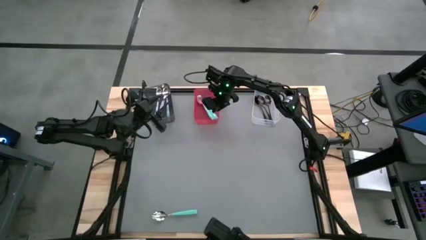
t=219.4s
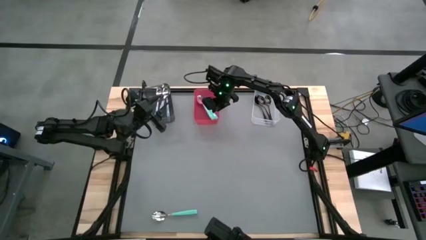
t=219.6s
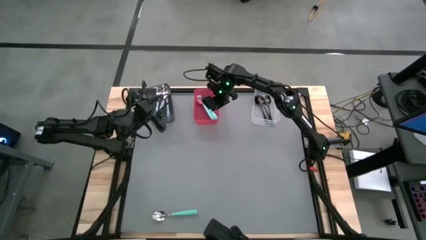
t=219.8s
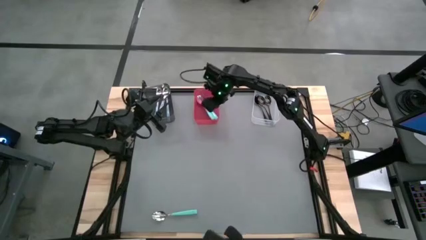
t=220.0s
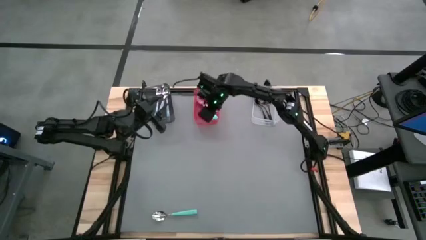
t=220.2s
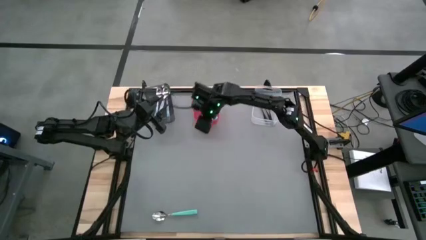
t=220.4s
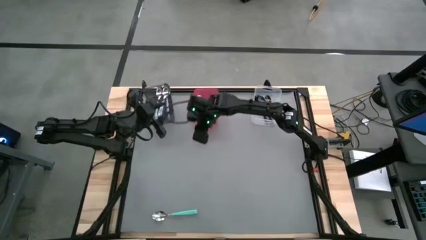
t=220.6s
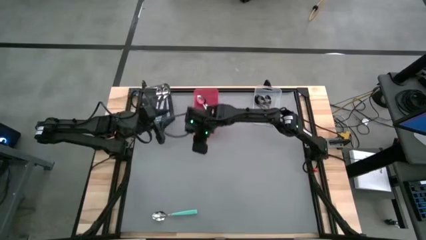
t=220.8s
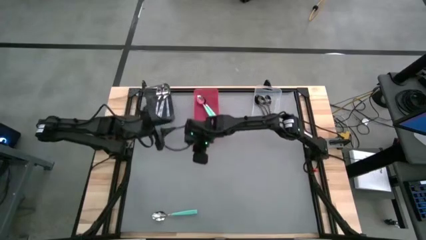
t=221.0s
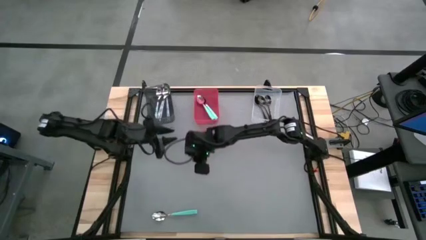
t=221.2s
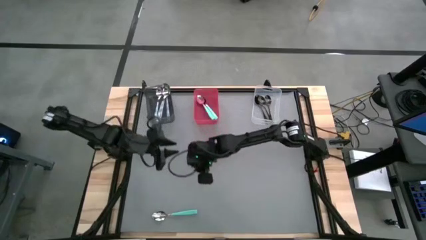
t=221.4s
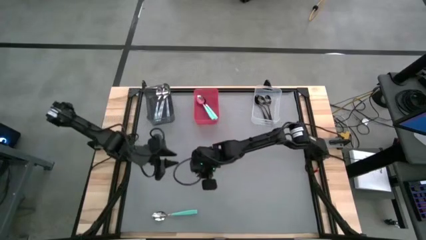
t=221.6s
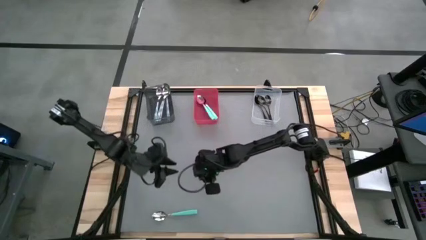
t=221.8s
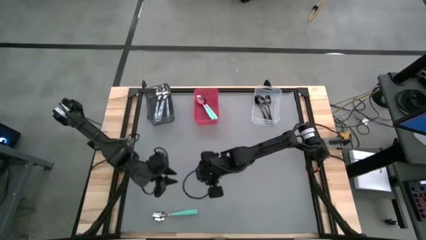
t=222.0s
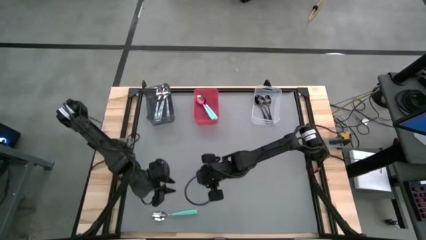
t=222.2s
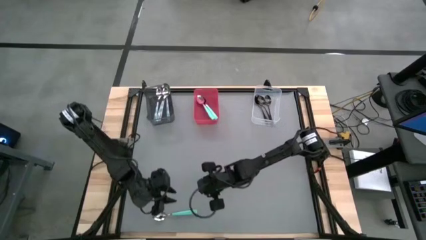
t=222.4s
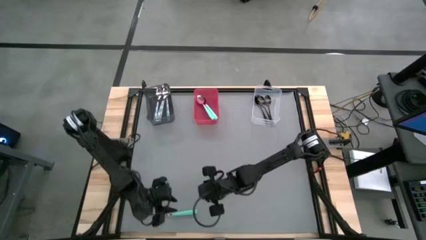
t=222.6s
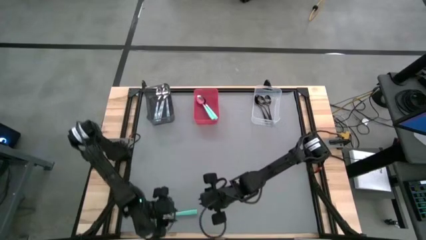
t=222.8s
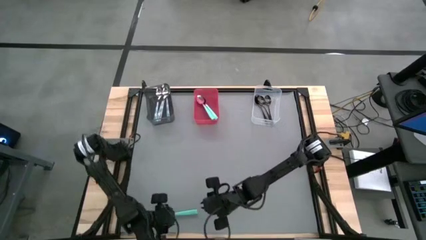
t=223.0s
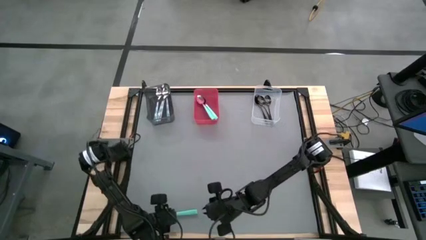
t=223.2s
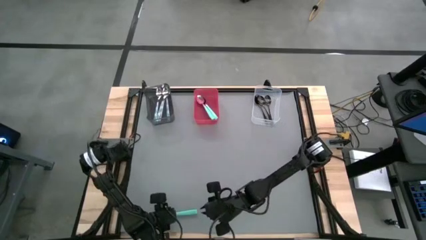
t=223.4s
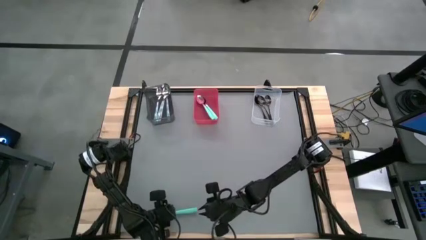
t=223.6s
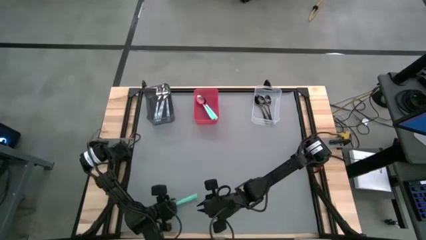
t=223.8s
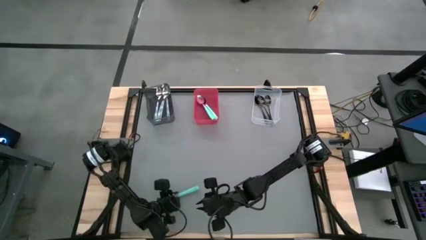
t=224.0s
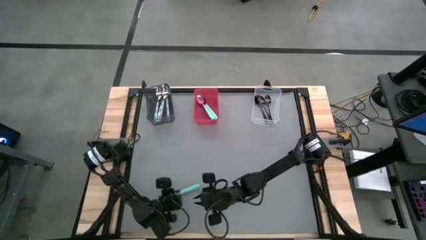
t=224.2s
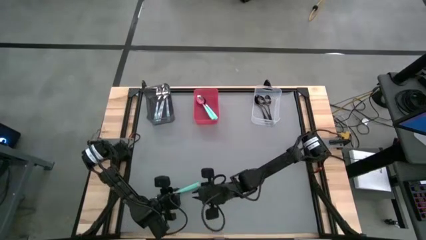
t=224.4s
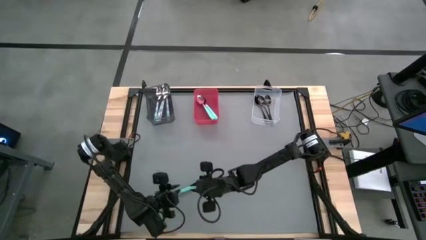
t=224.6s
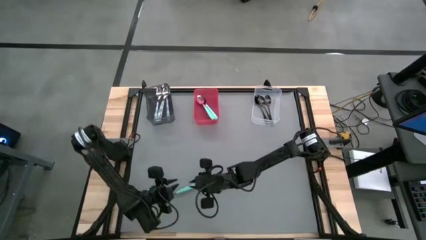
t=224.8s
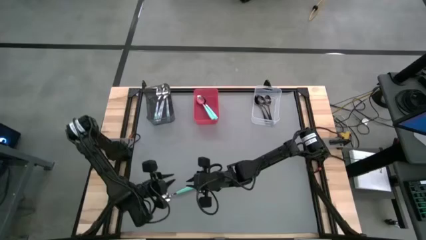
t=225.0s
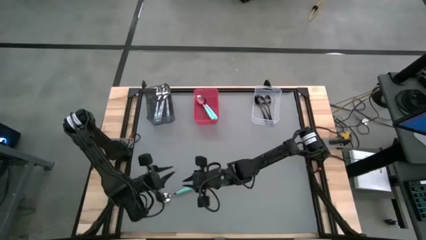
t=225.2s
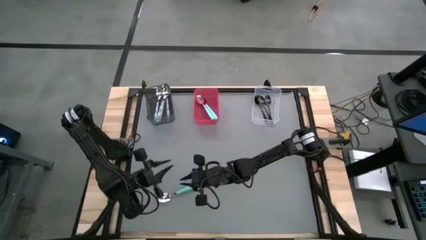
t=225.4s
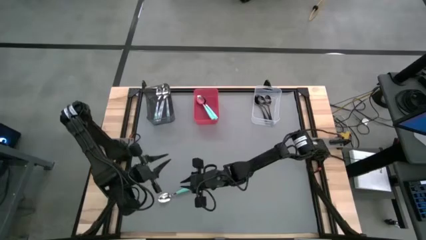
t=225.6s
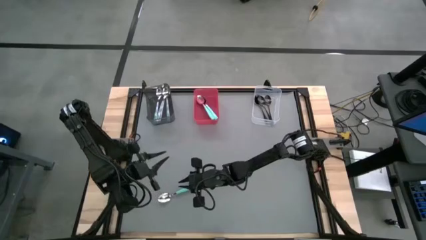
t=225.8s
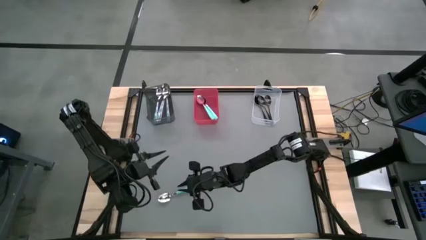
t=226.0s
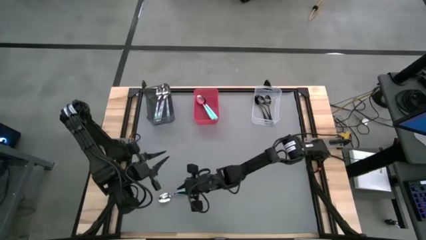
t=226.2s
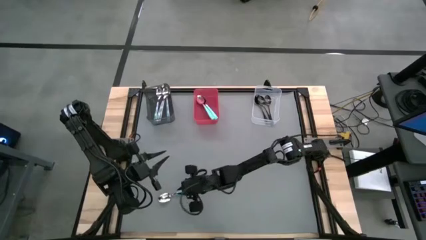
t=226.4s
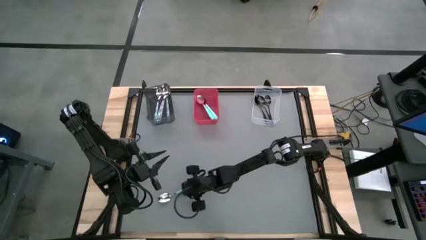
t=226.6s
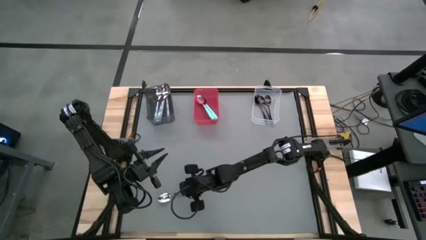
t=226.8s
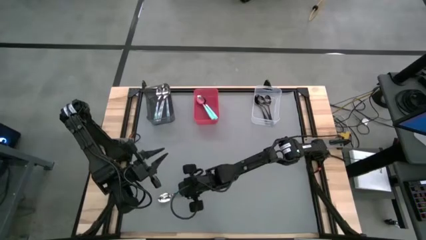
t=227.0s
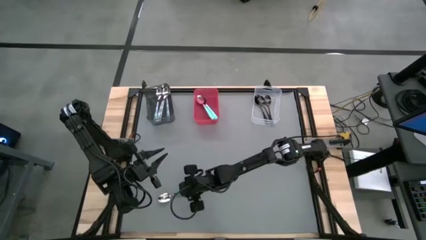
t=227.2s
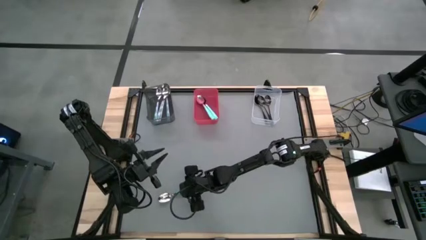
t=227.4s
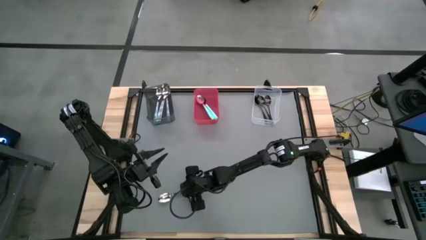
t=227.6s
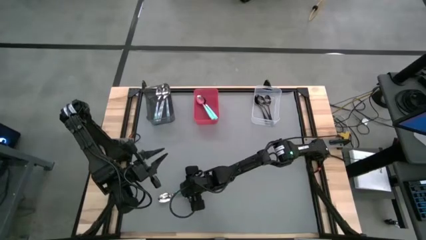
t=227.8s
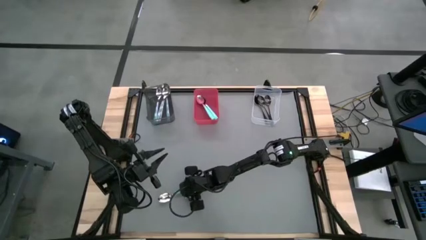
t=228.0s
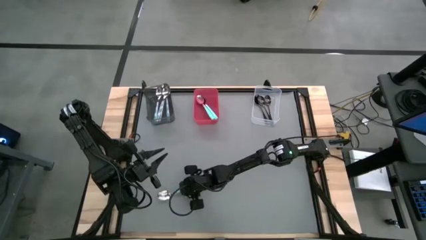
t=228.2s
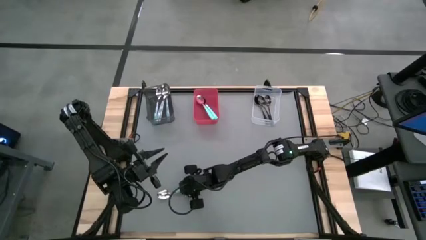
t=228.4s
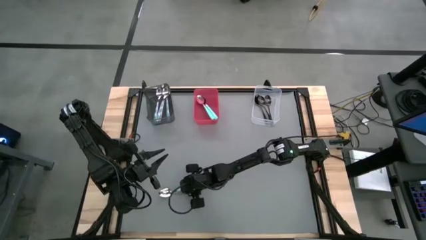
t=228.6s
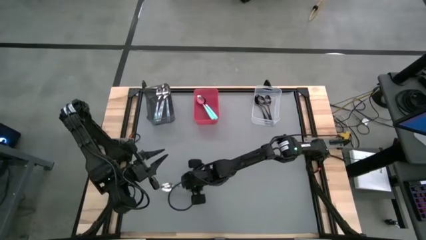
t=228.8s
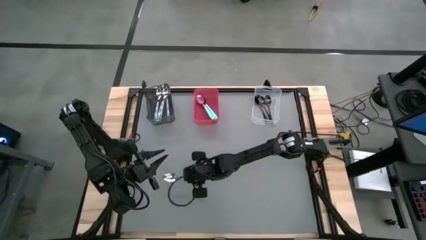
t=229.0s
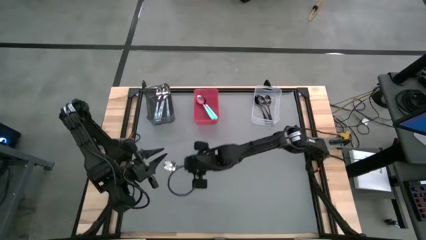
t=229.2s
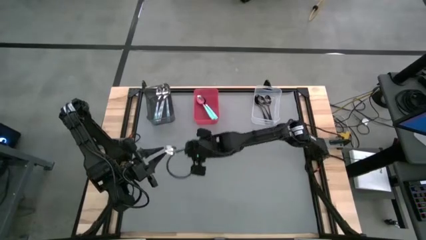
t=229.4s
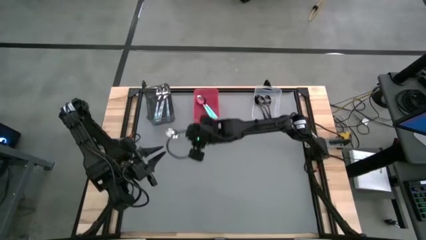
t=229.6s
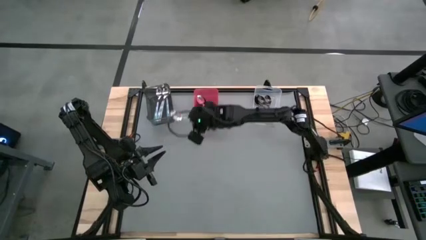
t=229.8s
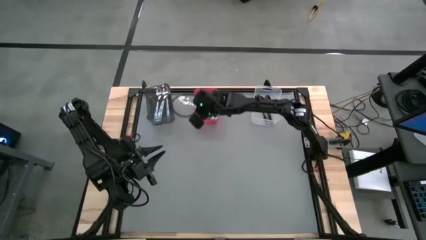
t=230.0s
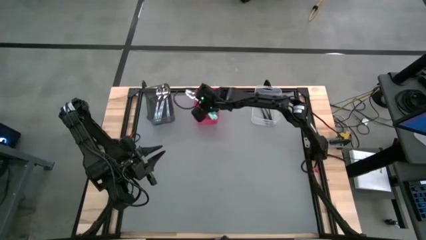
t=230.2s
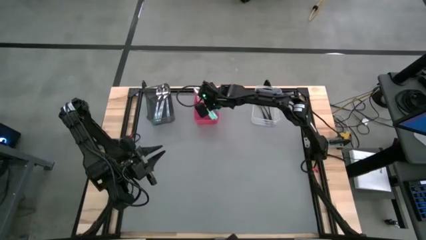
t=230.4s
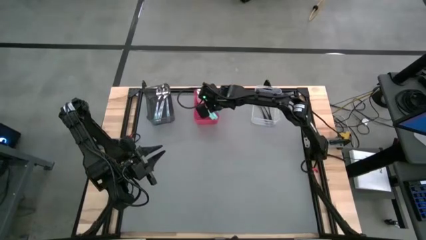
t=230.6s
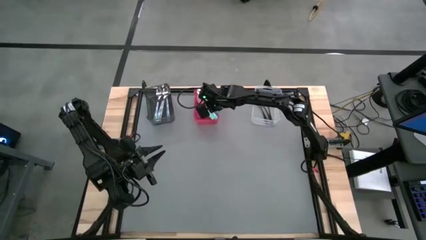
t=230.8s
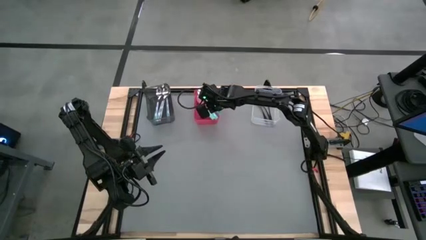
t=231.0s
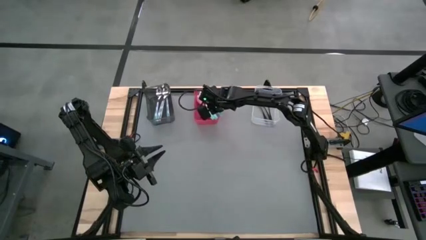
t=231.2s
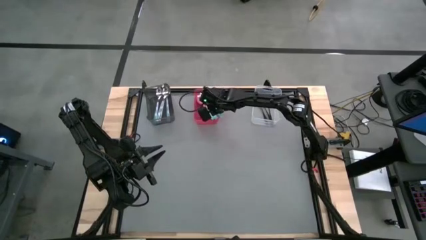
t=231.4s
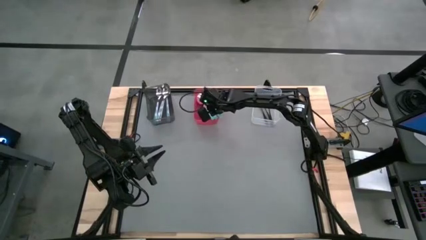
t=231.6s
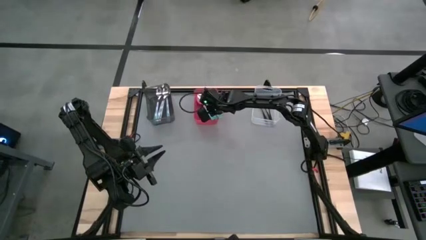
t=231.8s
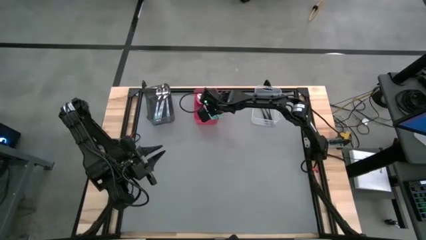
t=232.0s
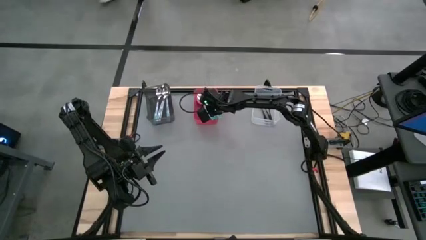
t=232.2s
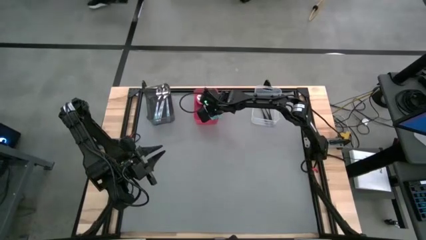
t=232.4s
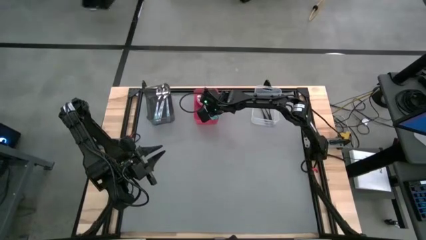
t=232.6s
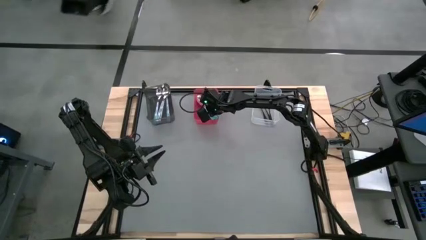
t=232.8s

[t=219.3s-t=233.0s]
Task: Sort silverware by color (type)
Put the blue spoon into the red bin

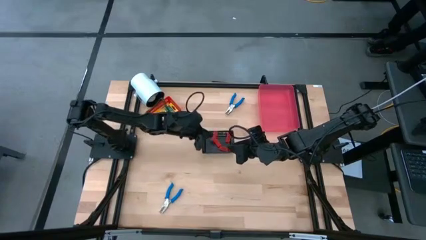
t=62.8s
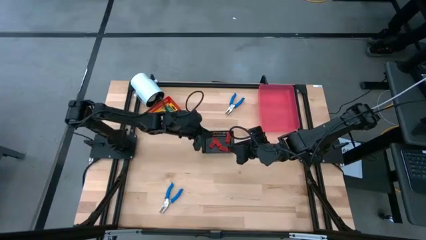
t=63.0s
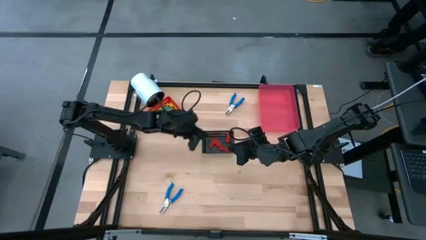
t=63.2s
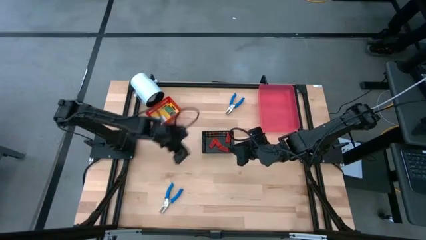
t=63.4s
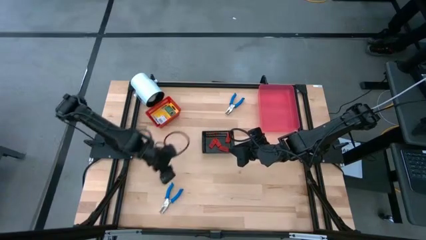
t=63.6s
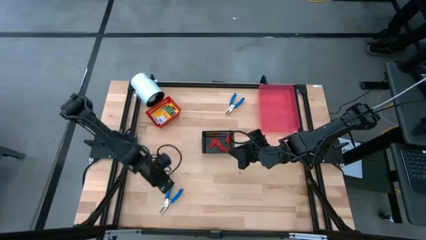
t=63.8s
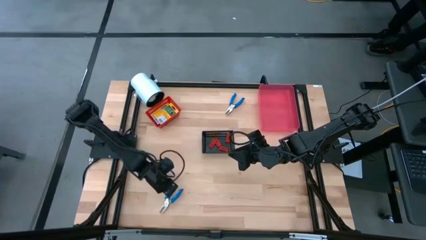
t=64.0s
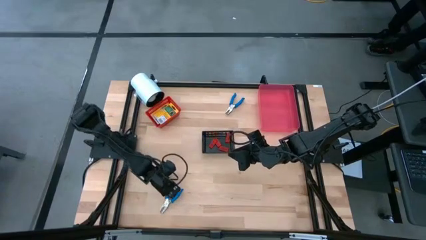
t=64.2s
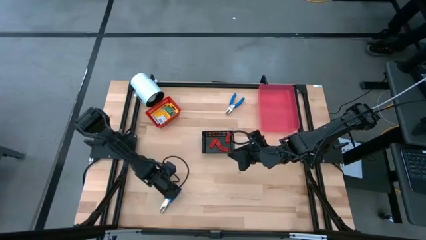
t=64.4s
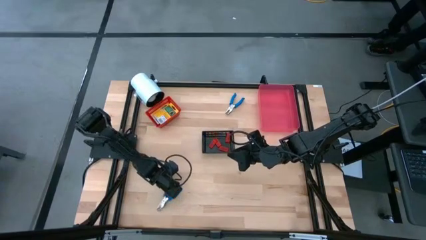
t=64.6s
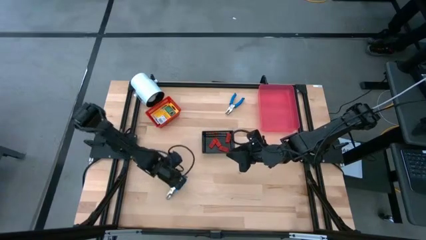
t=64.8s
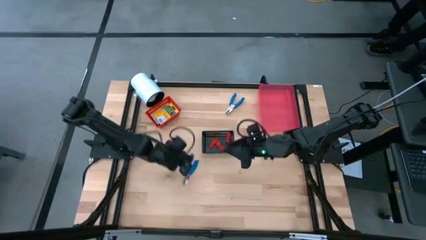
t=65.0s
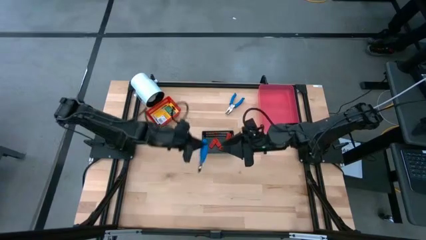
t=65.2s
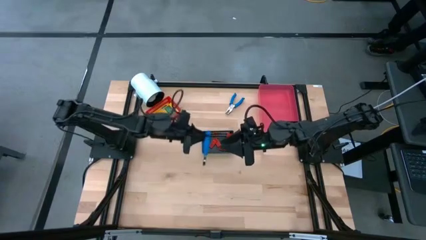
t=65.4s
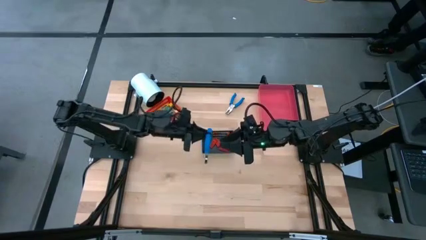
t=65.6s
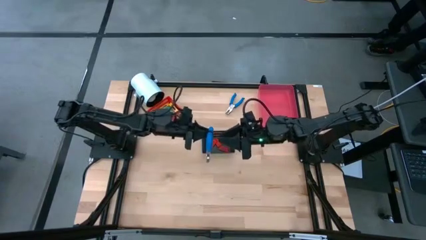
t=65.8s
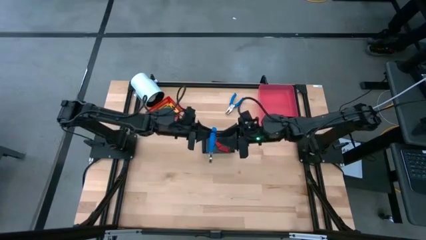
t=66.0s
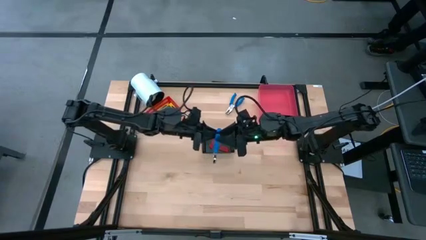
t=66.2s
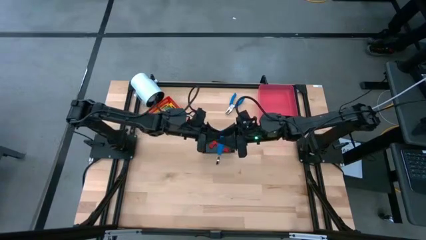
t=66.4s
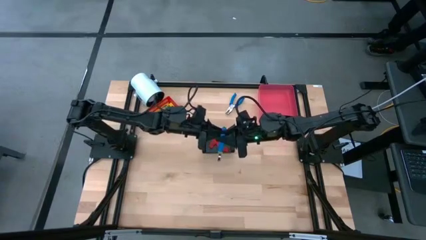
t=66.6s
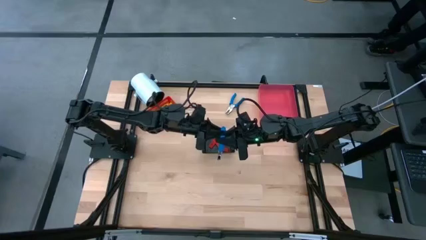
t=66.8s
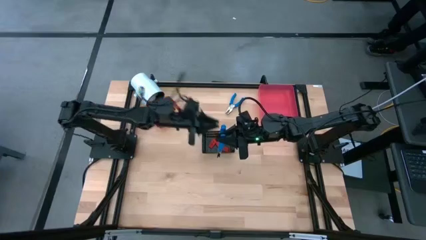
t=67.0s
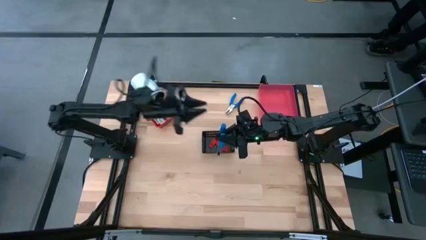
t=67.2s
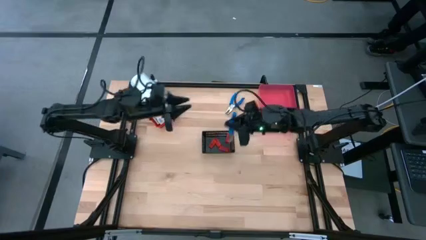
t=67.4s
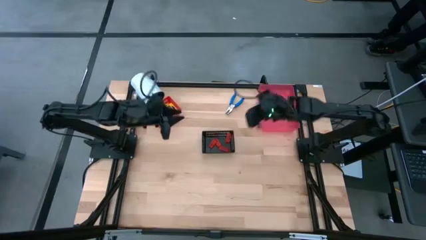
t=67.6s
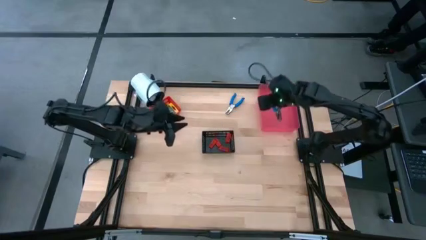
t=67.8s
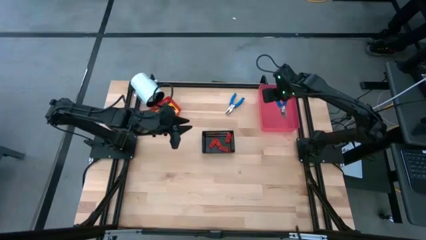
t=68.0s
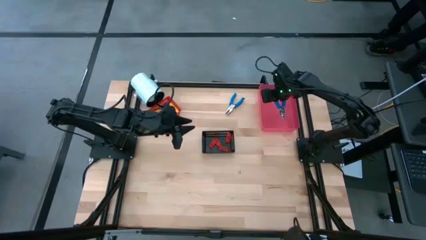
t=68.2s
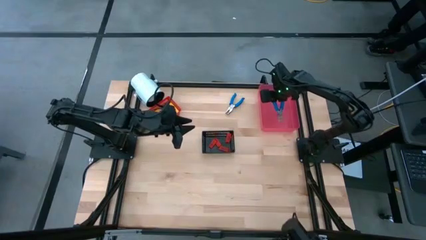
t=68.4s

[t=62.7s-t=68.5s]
Task: Pick & Place School Supplies
Put the bottom blue hole puncher into the pink bin
